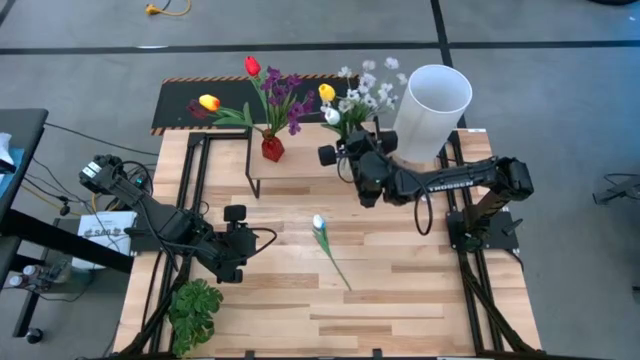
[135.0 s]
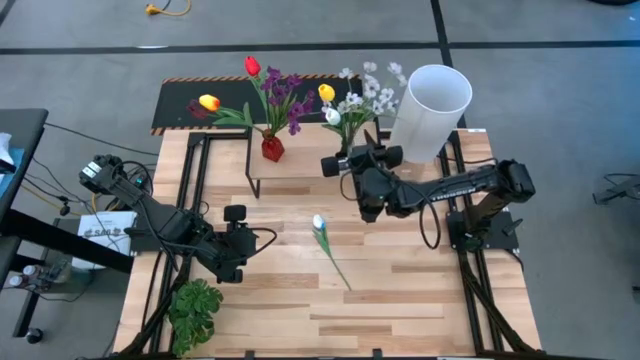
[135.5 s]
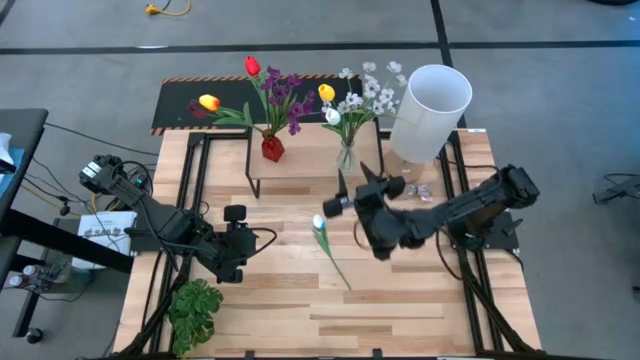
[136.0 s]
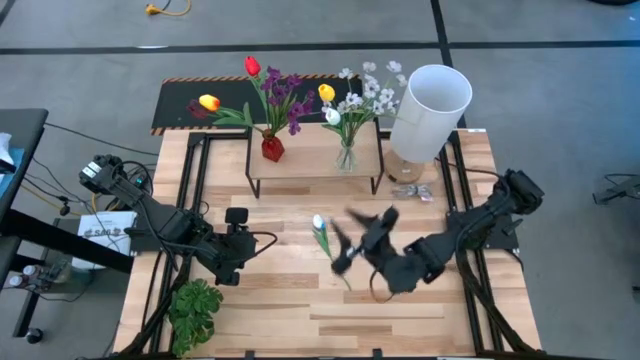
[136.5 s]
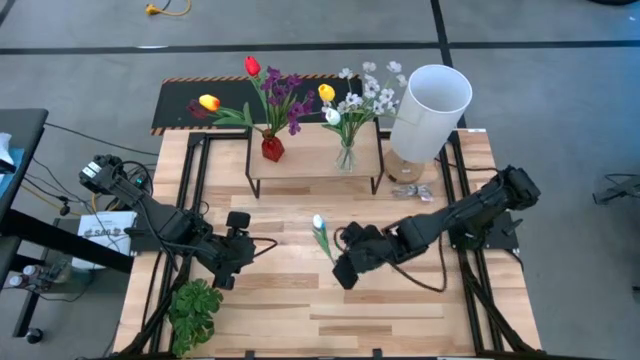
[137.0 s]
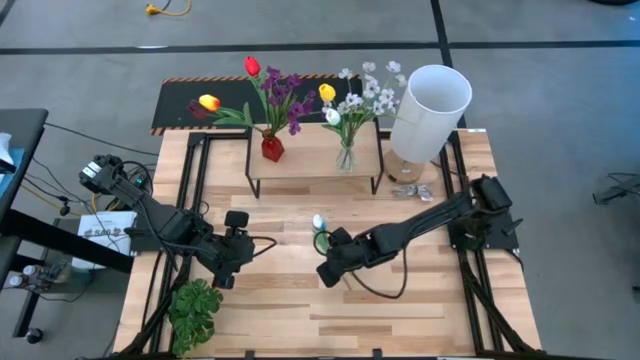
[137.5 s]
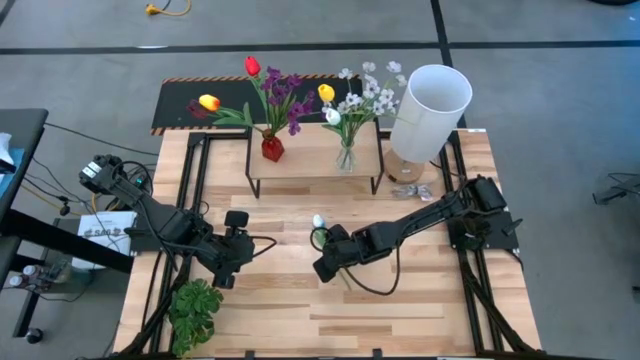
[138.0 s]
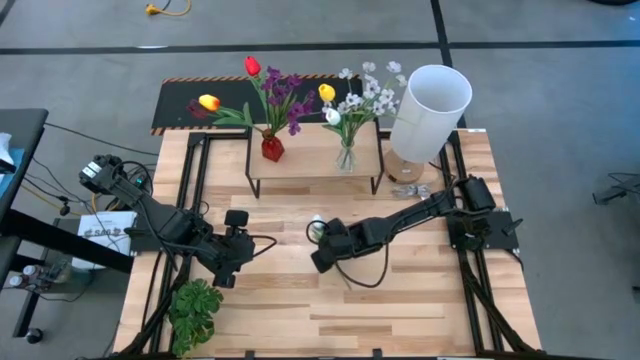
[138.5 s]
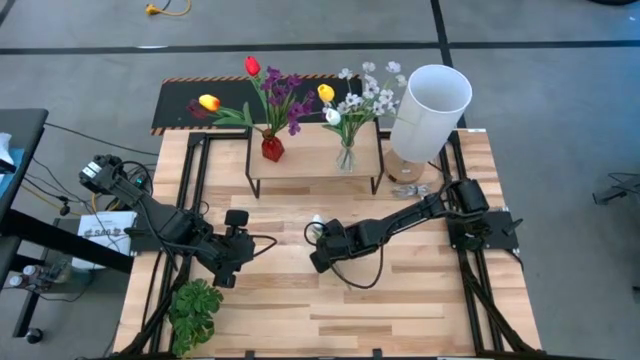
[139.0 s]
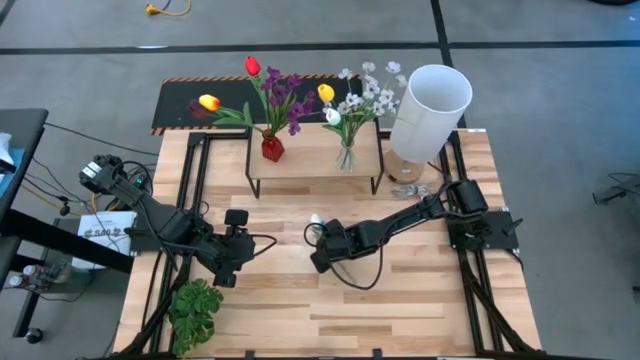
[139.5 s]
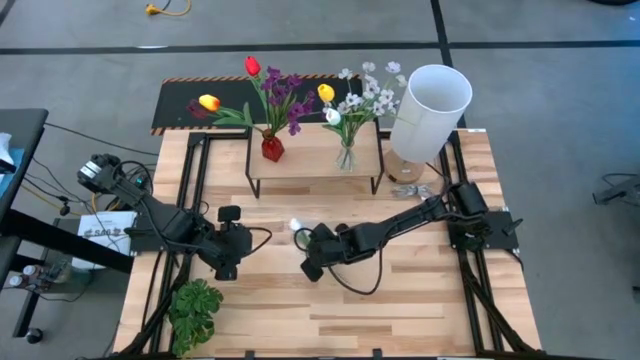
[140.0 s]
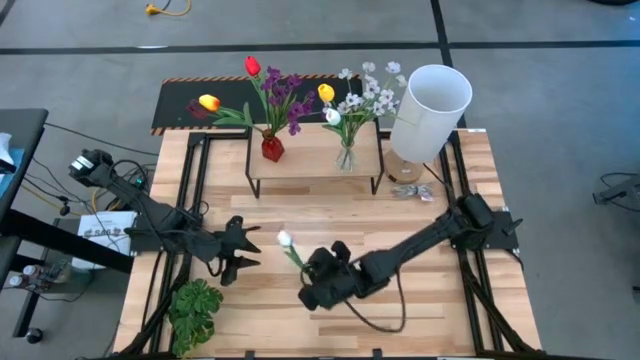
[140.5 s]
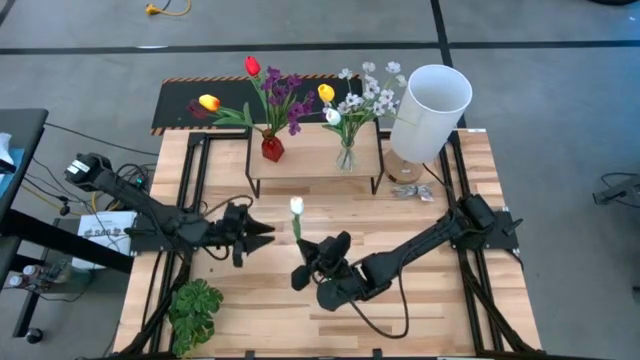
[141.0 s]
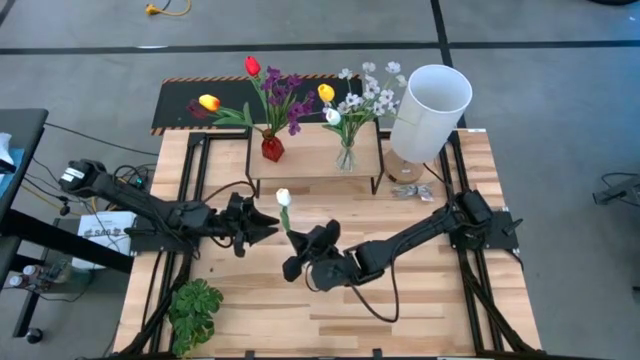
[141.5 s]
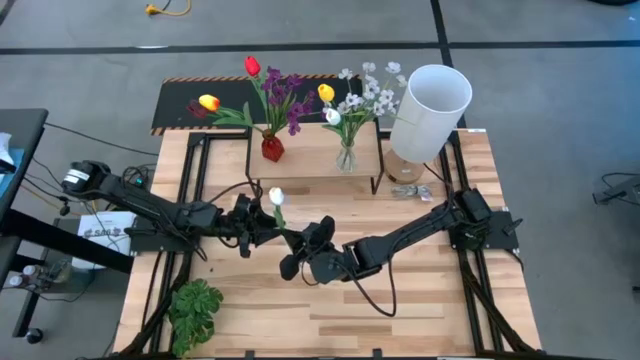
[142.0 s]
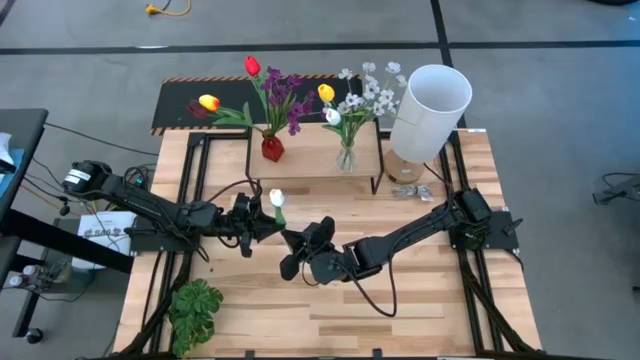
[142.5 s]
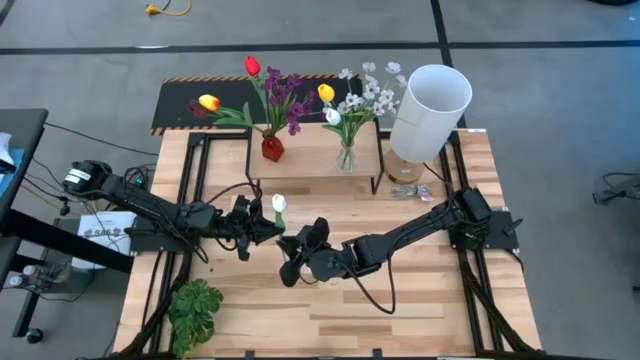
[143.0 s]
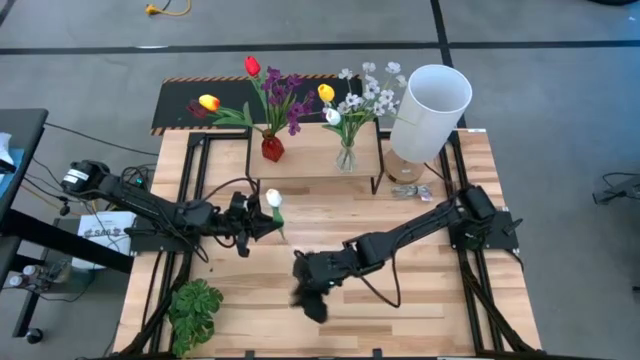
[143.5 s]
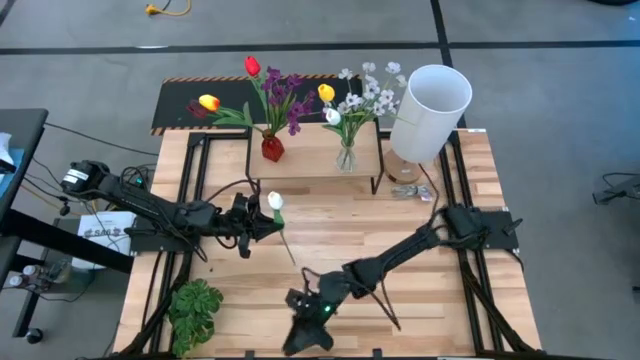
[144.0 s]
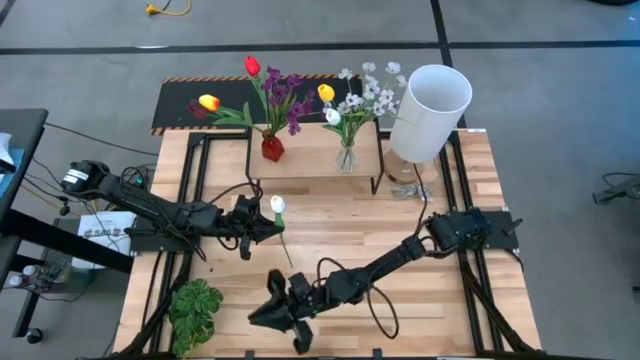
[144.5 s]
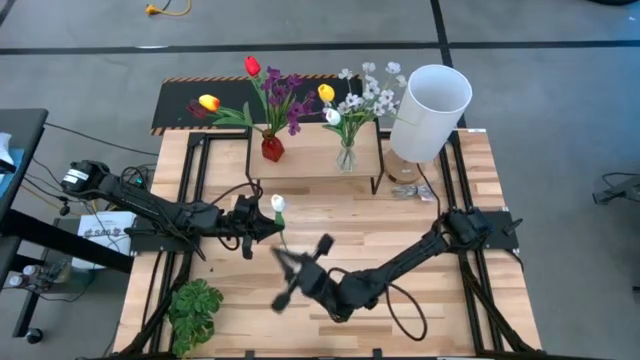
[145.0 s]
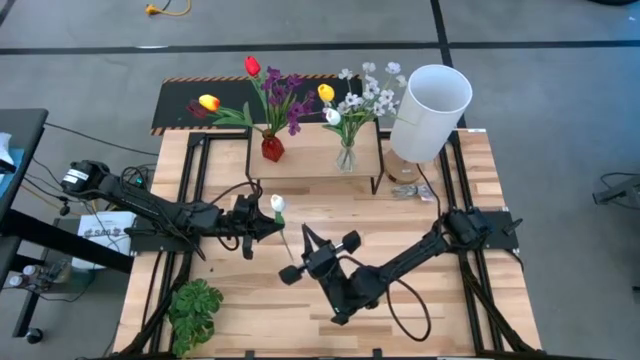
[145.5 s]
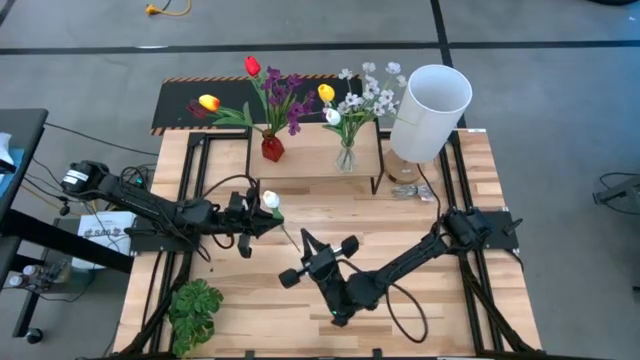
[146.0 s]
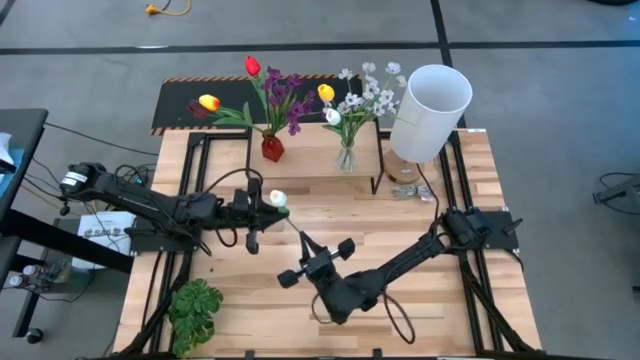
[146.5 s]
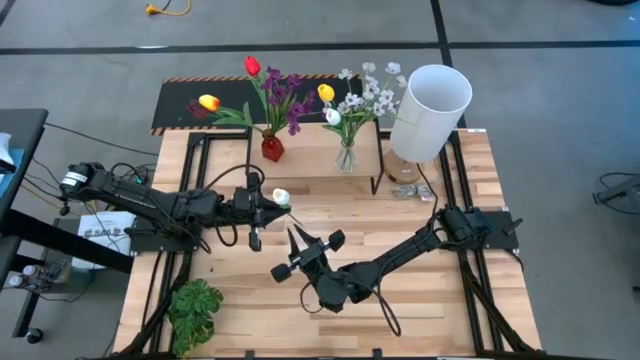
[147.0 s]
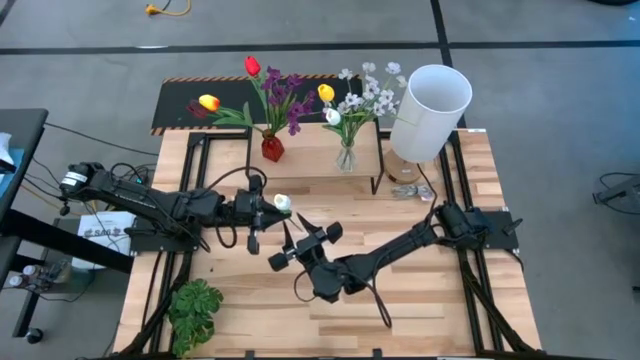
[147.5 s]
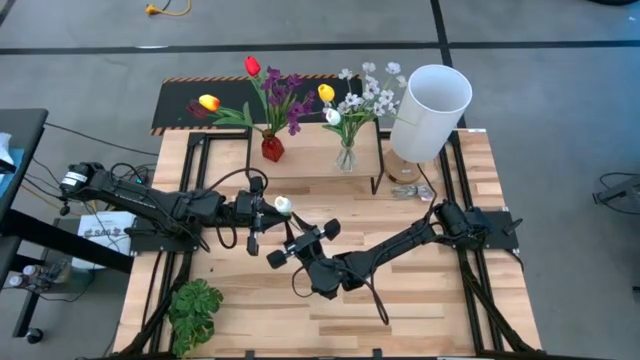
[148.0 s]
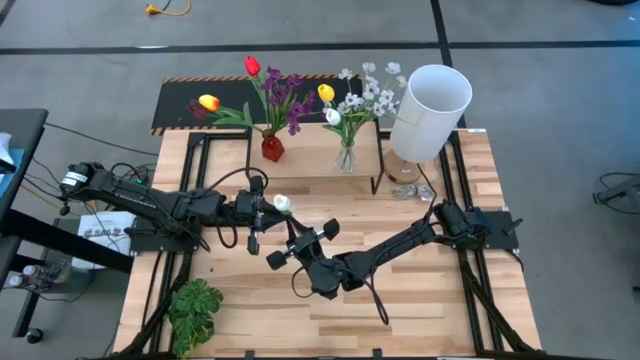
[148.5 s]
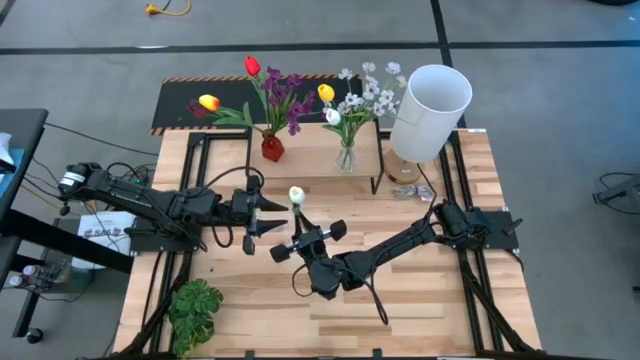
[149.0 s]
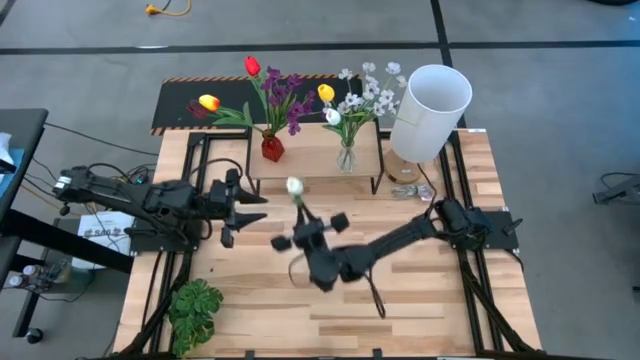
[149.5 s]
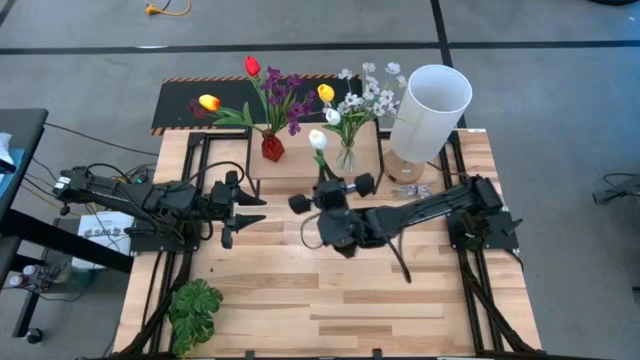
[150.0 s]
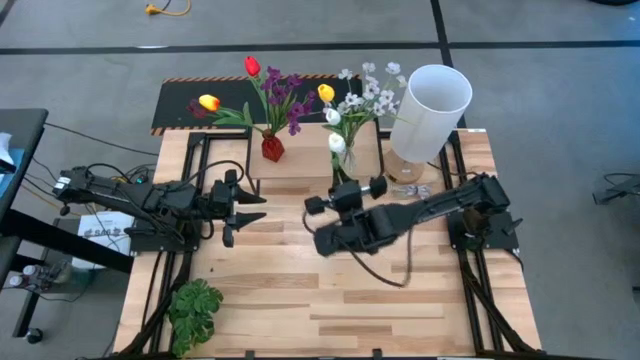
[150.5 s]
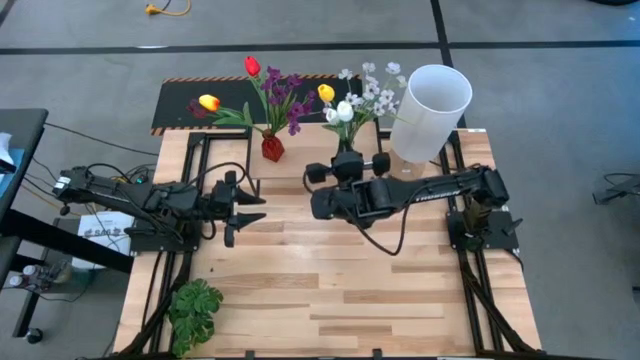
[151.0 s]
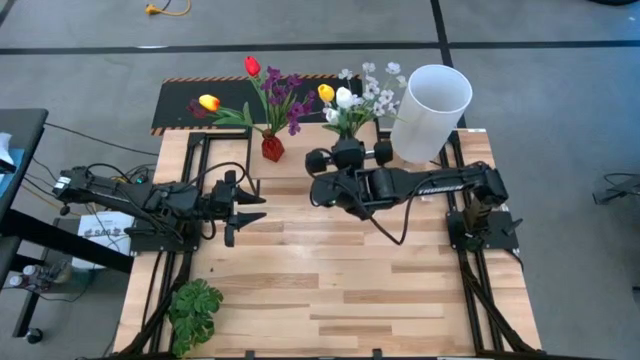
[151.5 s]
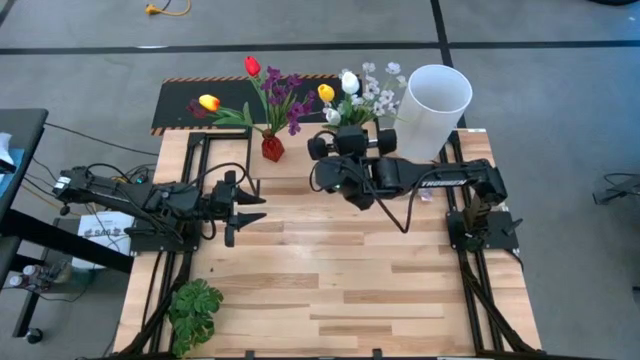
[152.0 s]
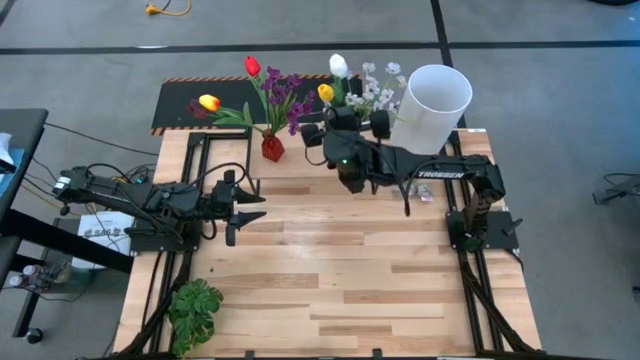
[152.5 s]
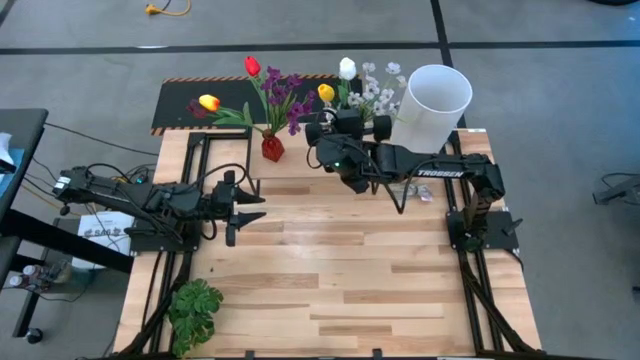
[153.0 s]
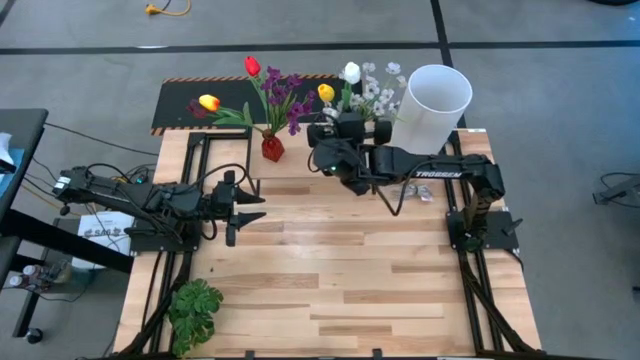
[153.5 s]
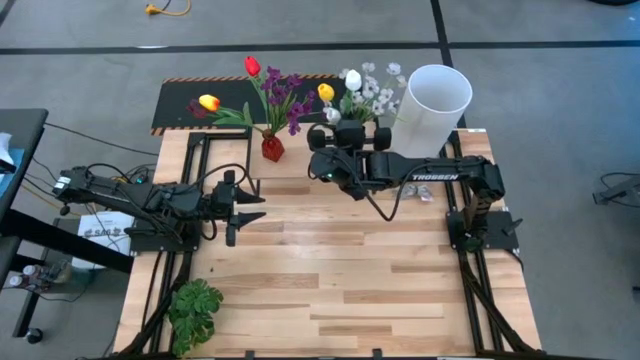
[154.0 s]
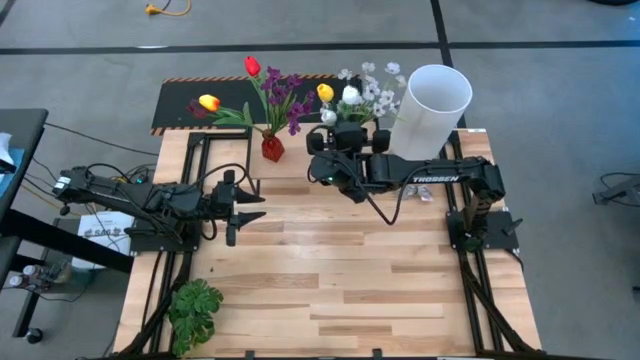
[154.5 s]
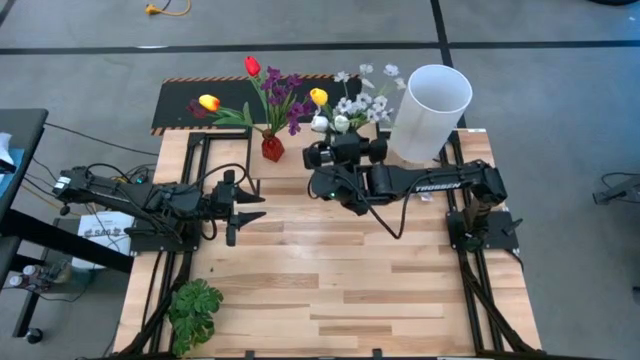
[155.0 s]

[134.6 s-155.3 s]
Task: Pick and place flowers into a vace then onto a shelf
Put the white flower into the transparent vase on the shelf
